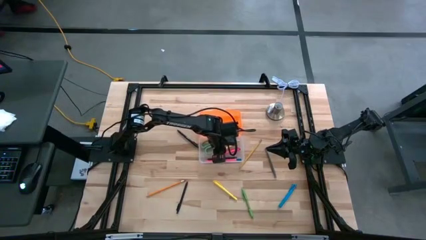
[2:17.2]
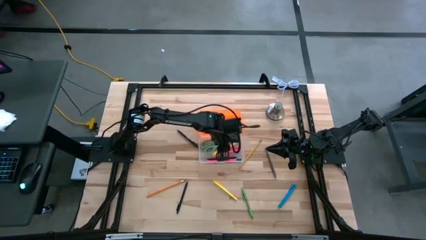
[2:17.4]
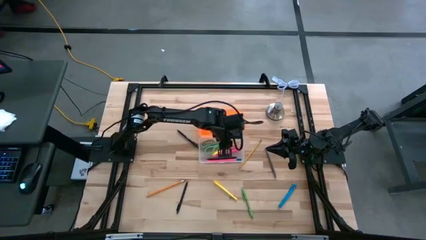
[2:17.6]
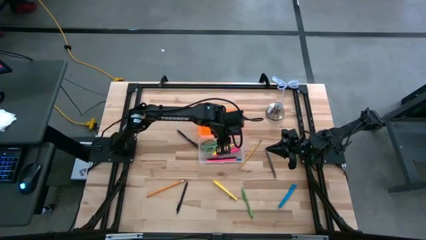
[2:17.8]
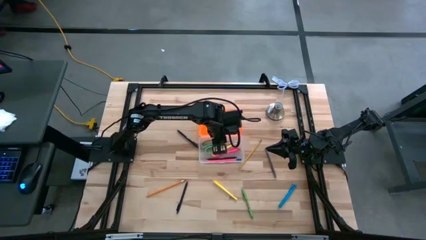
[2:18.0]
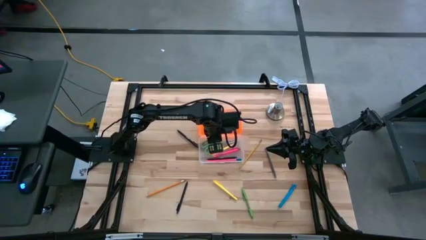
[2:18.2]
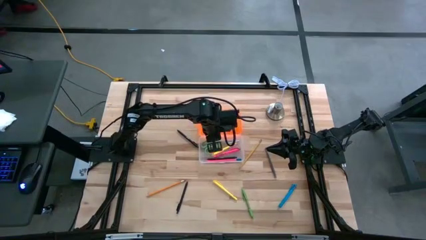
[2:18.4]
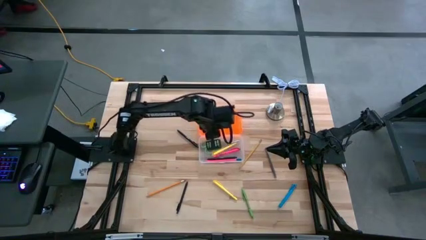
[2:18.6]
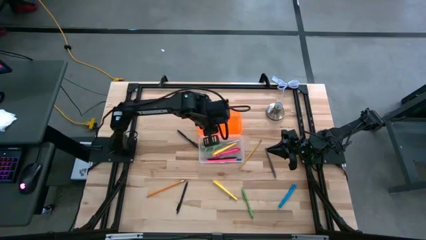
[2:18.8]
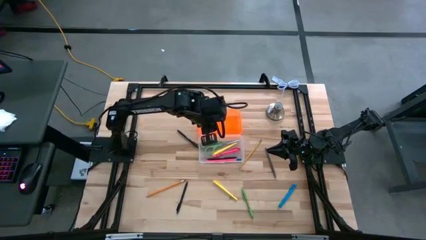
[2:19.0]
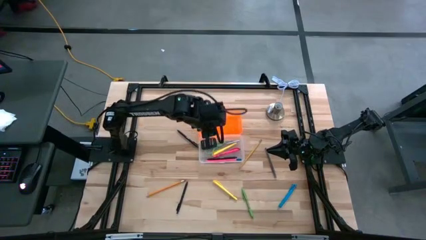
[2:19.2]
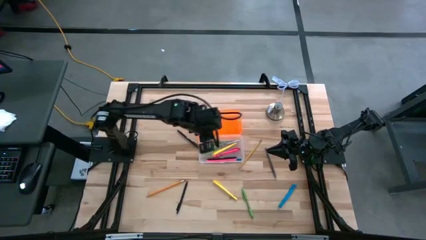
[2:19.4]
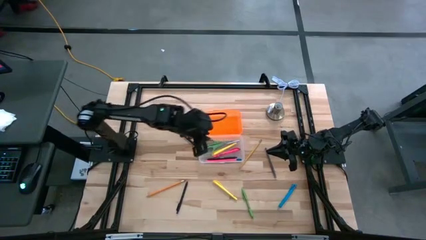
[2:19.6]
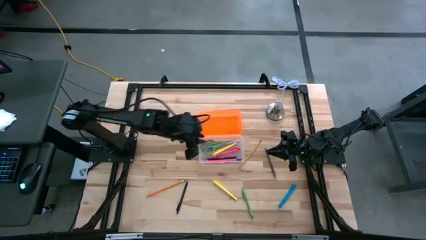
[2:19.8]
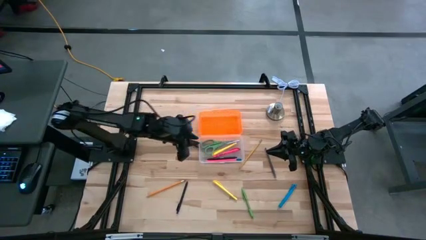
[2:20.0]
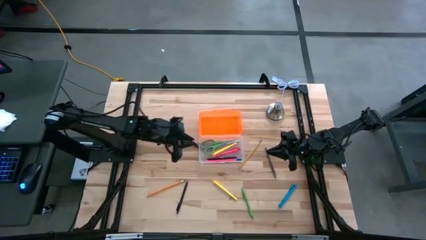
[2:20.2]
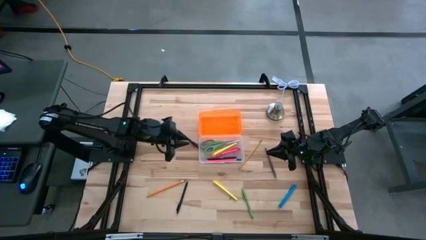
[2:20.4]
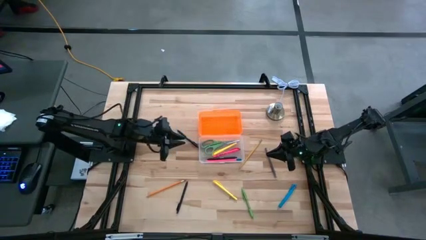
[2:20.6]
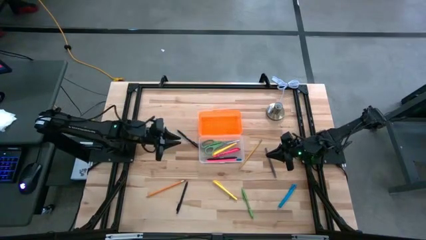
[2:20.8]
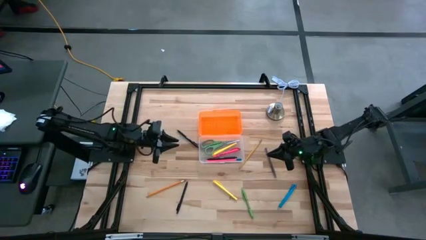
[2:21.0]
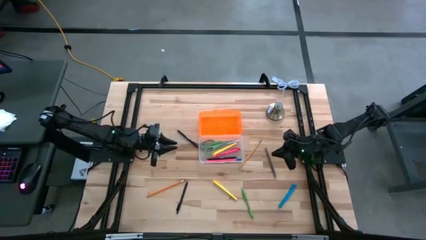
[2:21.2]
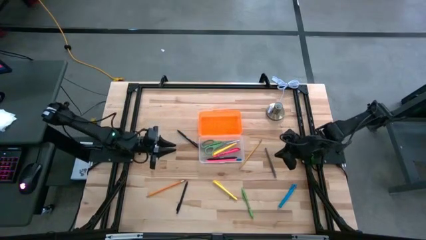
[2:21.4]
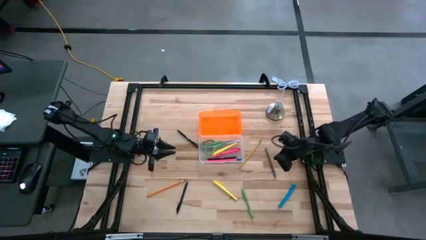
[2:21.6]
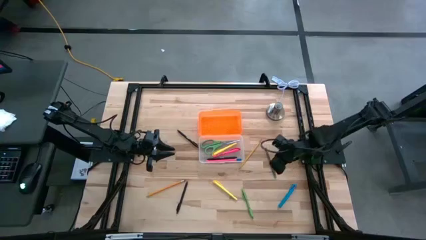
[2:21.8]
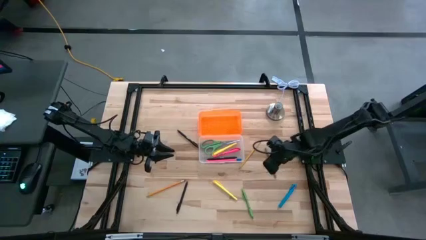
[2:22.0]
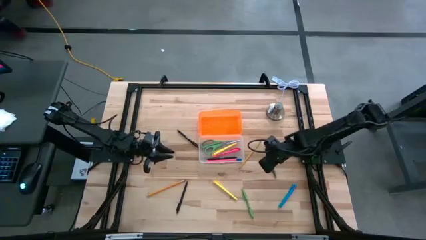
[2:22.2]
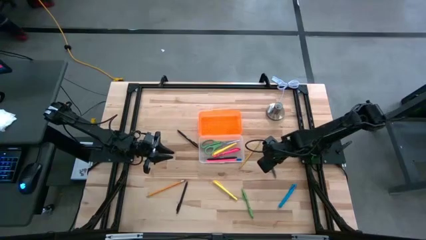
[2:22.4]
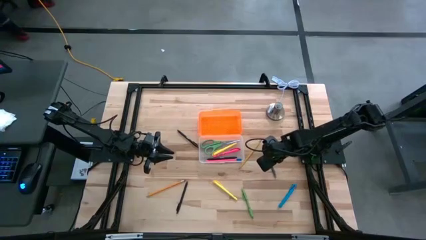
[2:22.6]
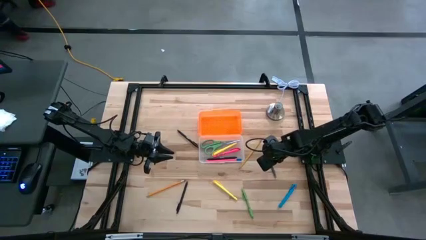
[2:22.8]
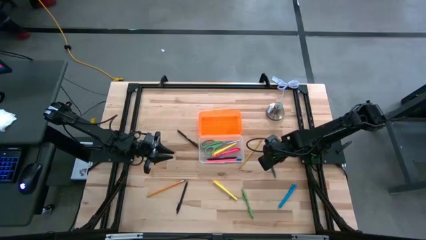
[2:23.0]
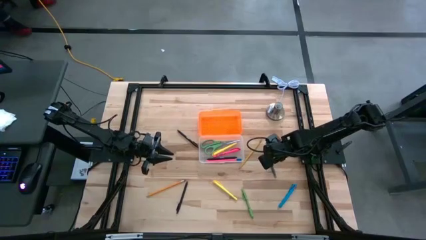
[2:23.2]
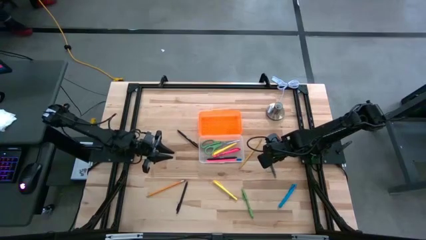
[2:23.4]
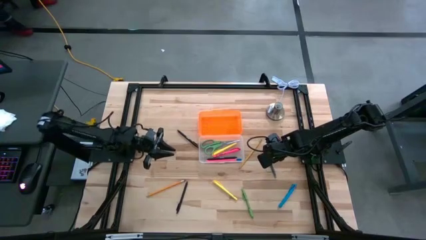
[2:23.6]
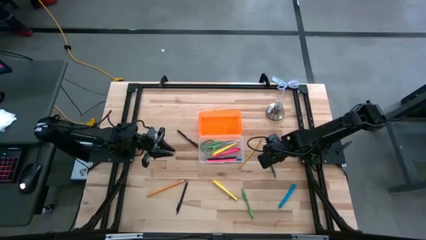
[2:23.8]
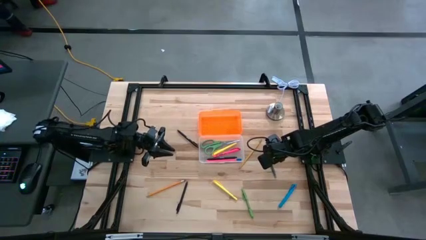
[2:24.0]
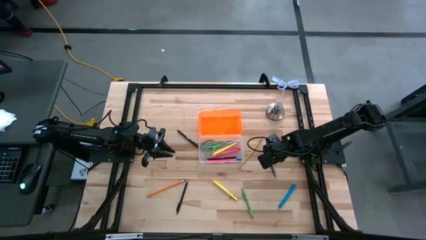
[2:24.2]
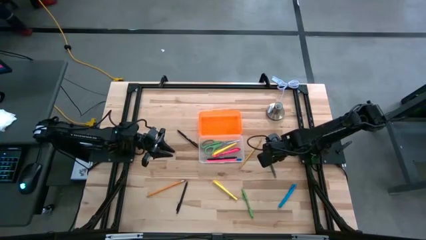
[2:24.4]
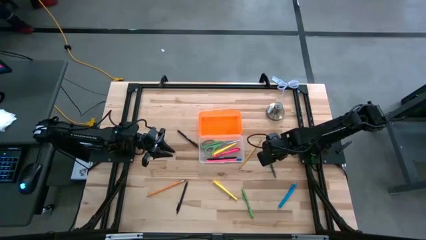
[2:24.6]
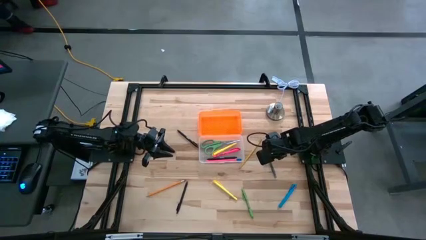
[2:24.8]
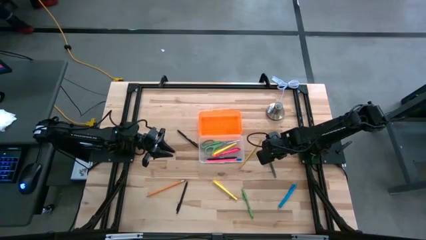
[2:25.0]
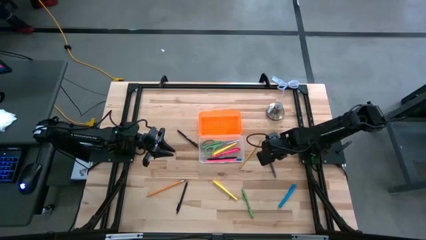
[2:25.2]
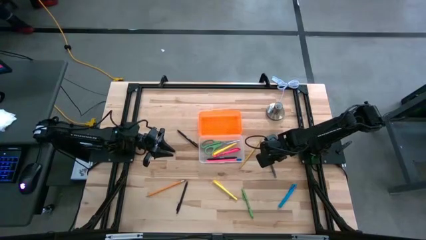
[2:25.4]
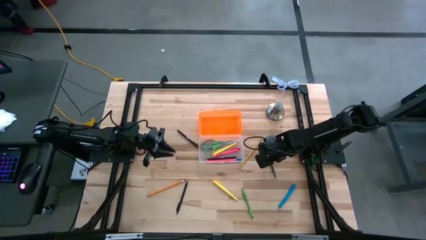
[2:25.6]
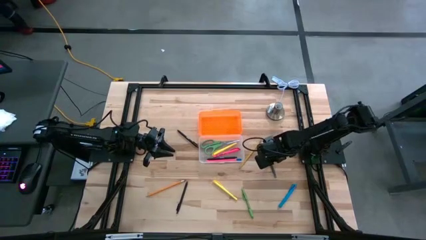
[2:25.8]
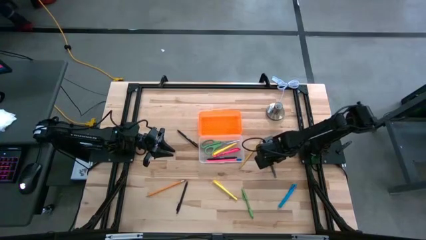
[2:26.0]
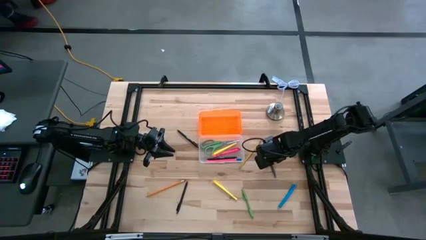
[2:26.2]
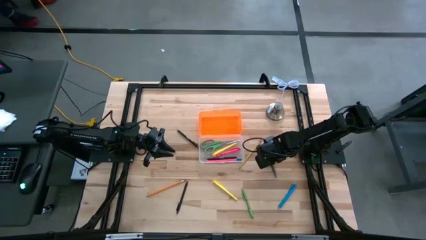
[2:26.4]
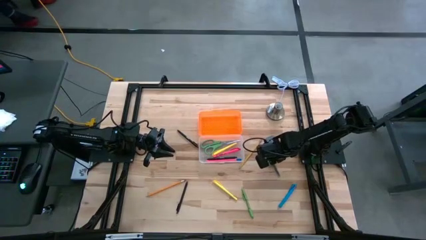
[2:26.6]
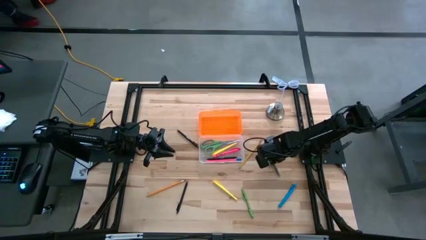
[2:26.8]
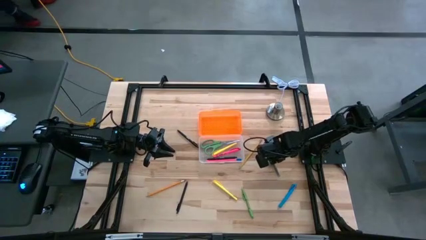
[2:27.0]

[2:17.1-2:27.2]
Task: Pick & place school supplies into a supply box
Put the gray pen into the container

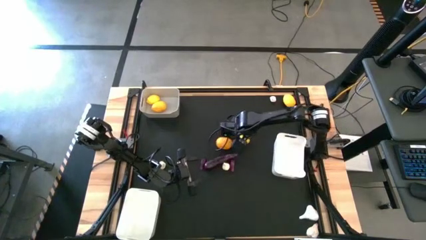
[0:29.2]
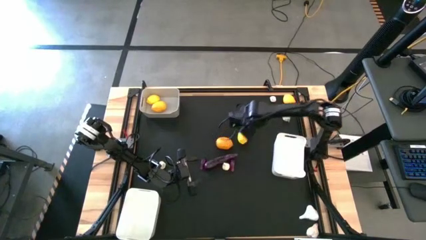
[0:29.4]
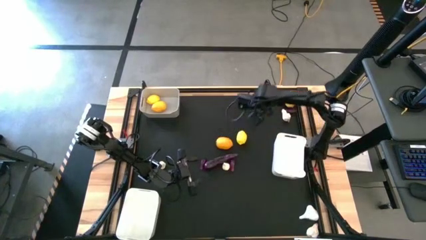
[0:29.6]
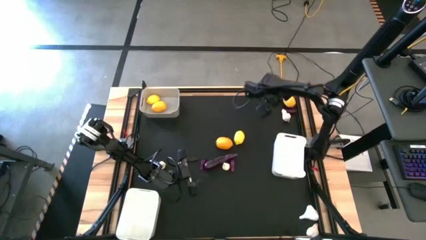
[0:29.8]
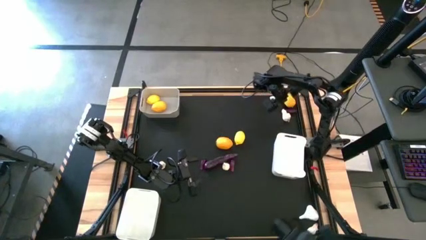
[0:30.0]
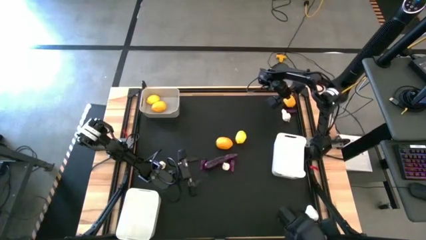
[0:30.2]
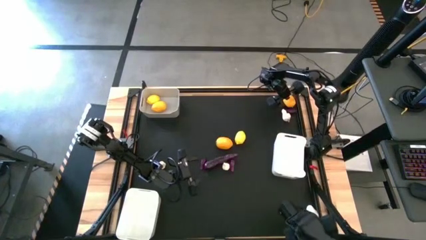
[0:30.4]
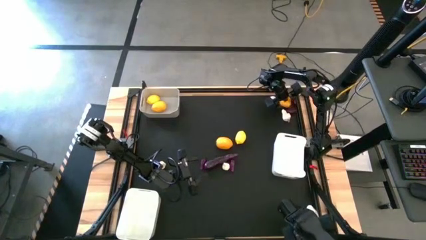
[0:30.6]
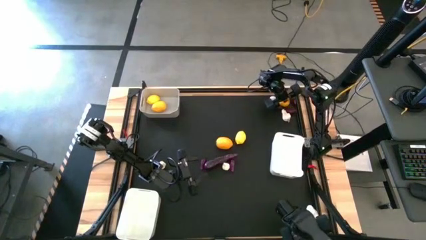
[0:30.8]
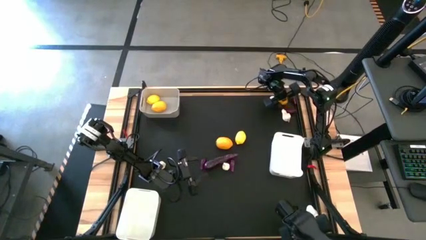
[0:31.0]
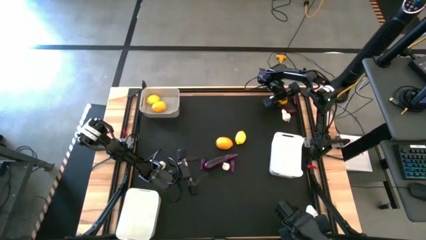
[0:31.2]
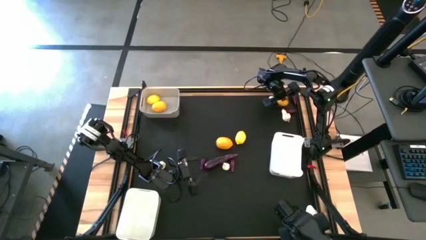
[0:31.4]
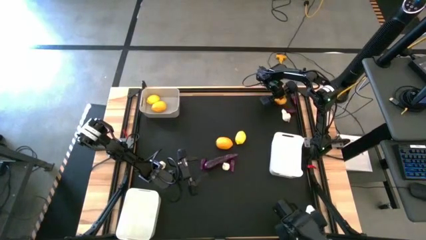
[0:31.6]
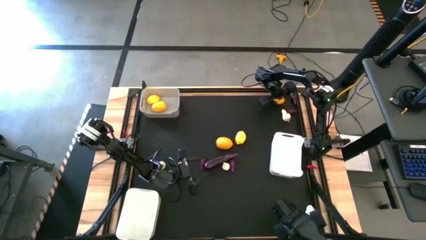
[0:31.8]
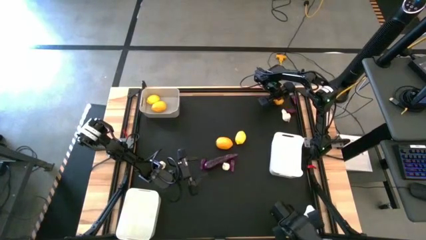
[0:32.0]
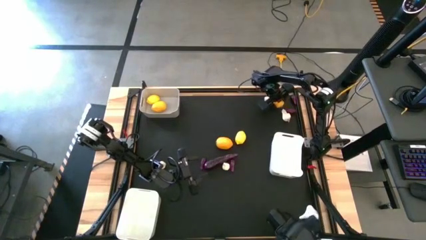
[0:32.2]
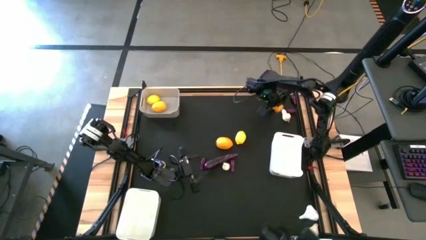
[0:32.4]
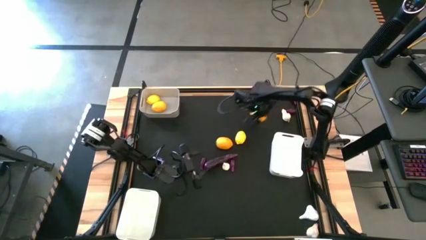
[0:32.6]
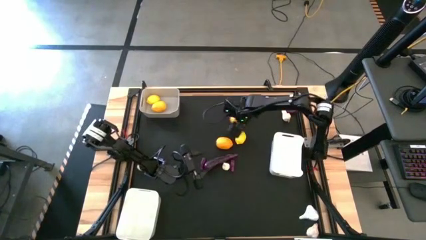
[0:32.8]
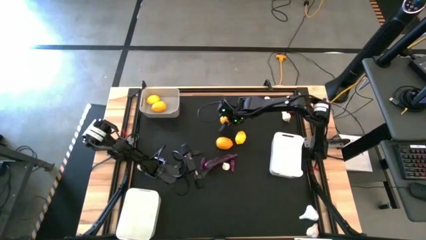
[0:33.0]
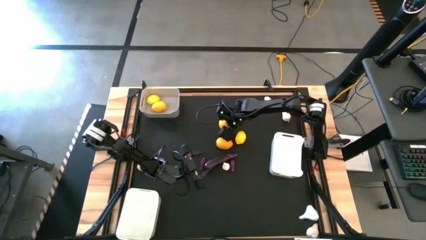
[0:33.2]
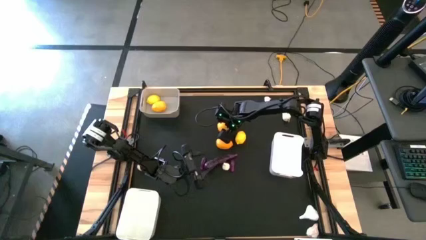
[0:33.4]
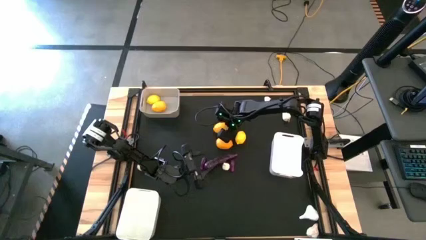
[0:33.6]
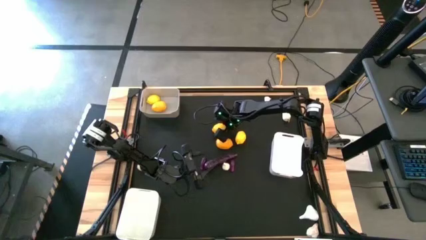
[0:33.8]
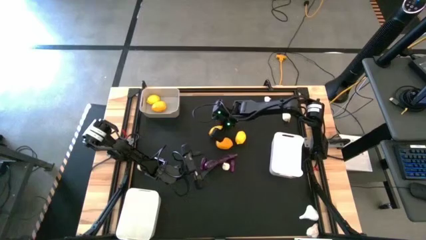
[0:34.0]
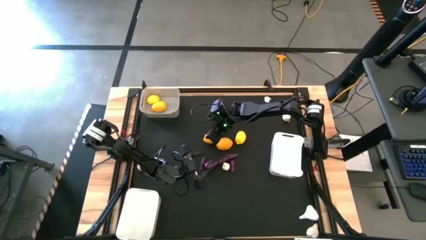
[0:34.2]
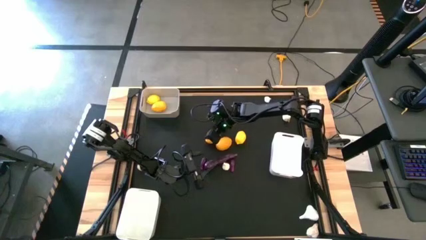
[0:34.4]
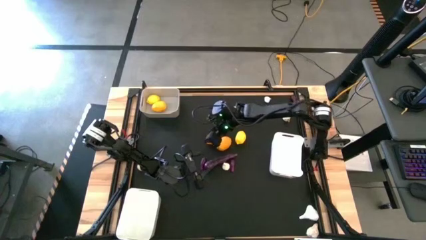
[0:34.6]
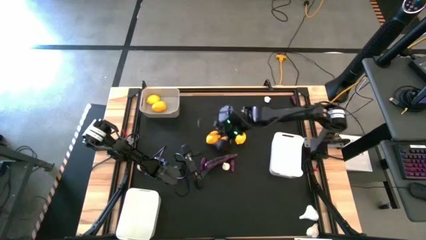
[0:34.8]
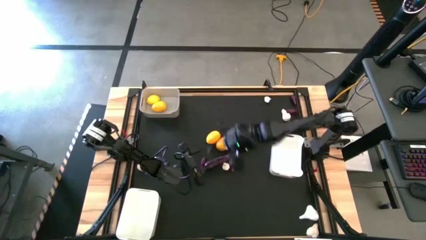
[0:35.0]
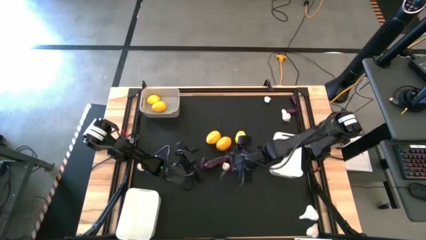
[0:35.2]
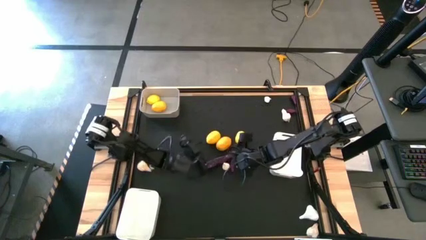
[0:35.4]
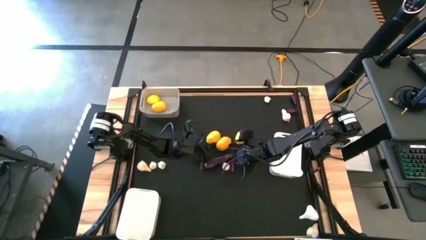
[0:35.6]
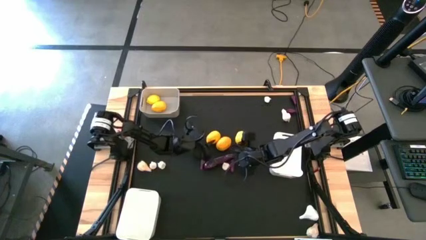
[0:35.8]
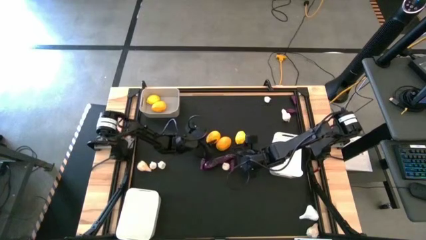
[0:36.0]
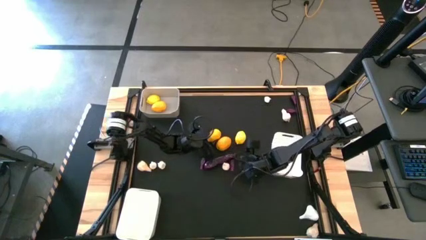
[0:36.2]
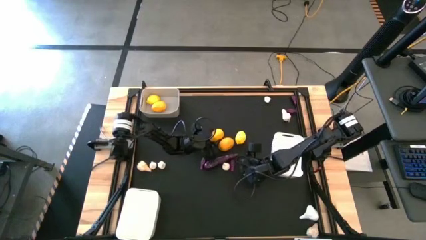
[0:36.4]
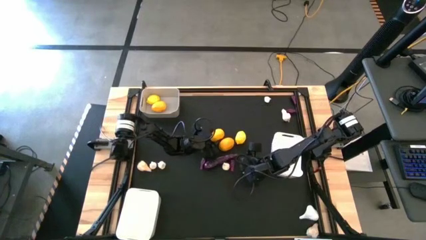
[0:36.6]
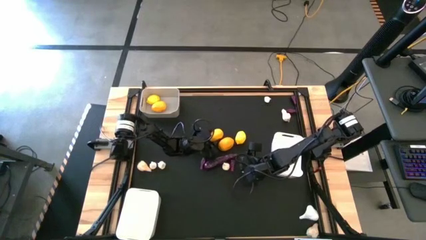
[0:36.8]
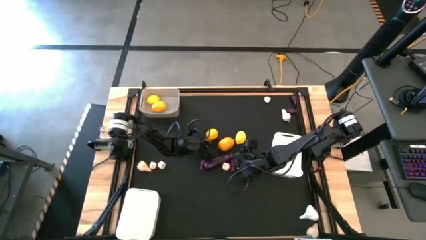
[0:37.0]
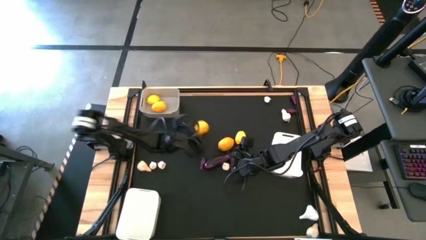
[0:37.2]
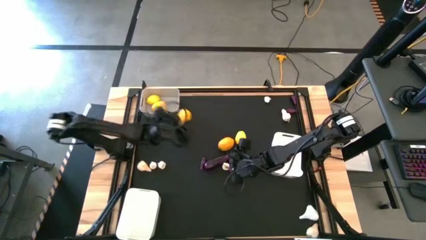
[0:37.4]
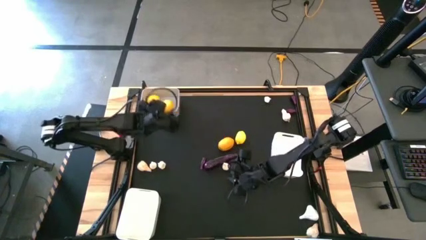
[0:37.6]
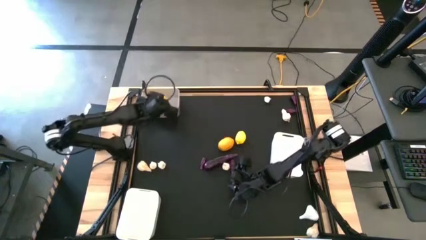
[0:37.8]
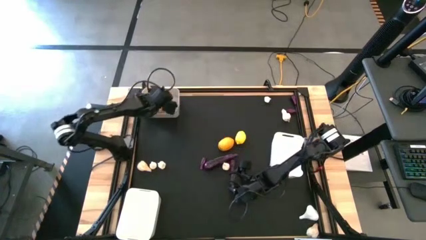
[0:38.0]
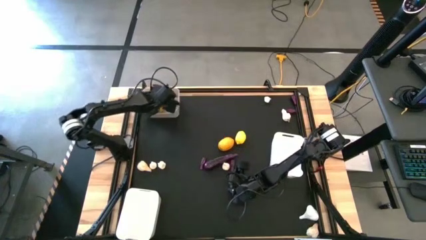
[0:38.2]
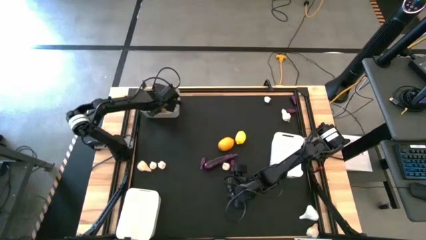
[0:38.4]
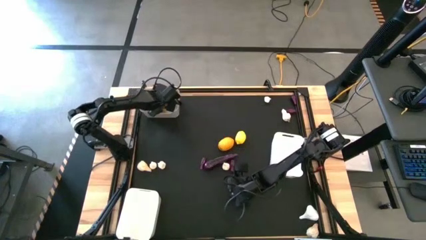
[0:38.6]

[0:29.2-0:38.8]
Task: Sort produce into baskets
Put the top right lemon into the top white bin
